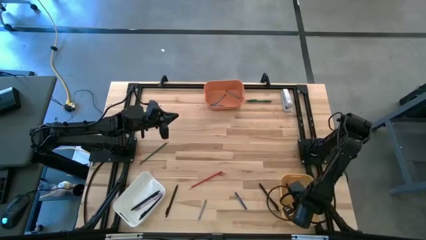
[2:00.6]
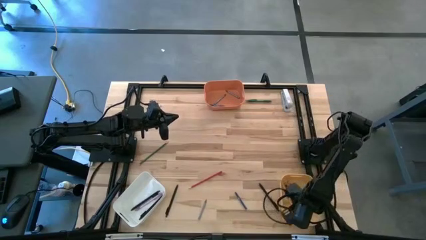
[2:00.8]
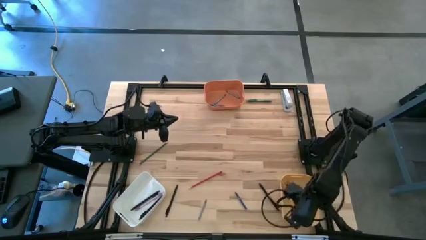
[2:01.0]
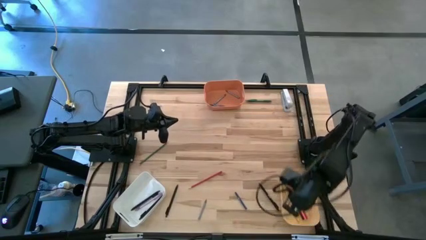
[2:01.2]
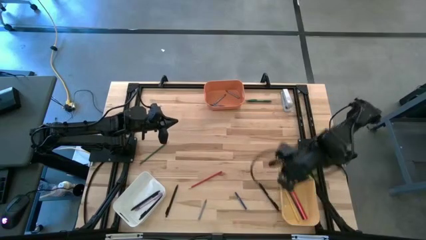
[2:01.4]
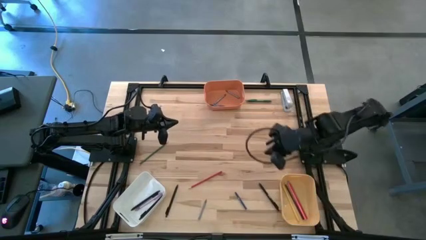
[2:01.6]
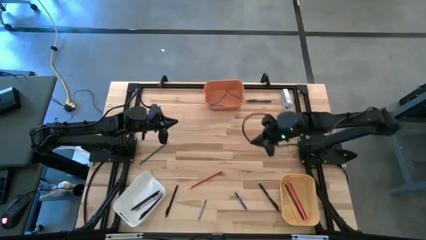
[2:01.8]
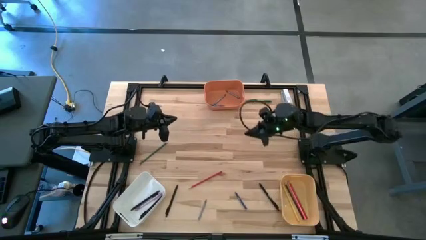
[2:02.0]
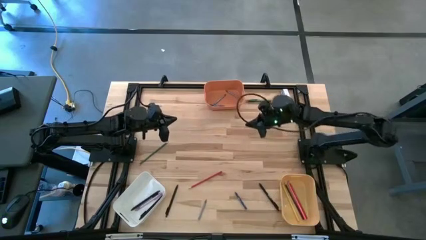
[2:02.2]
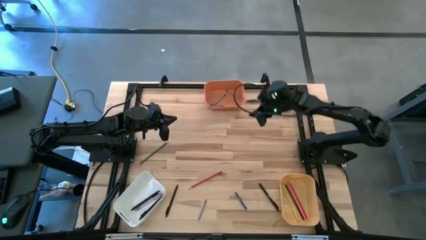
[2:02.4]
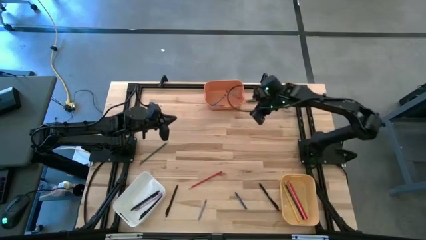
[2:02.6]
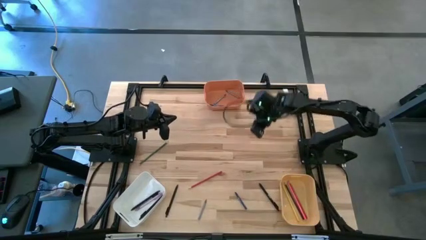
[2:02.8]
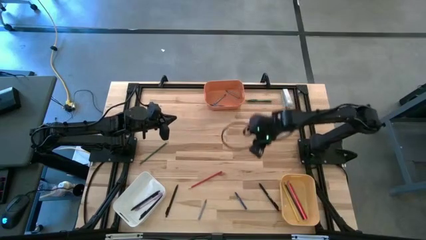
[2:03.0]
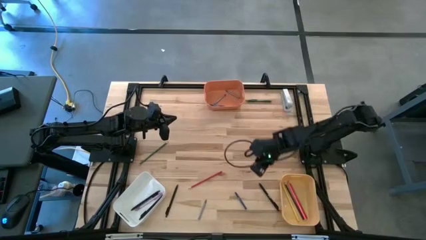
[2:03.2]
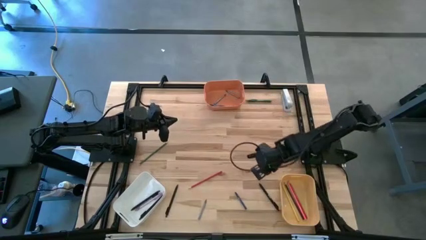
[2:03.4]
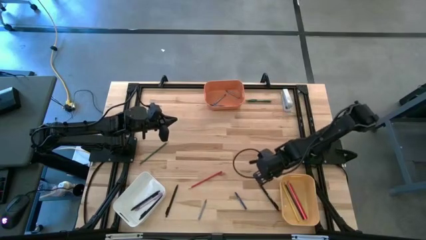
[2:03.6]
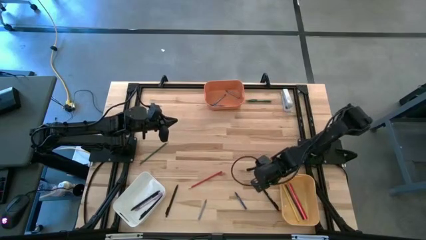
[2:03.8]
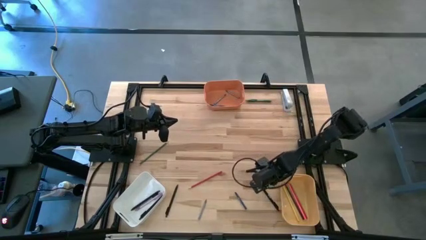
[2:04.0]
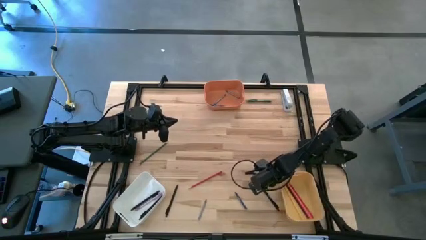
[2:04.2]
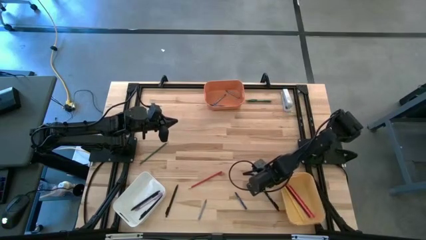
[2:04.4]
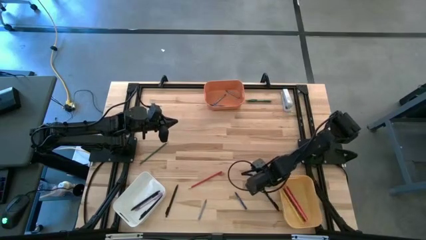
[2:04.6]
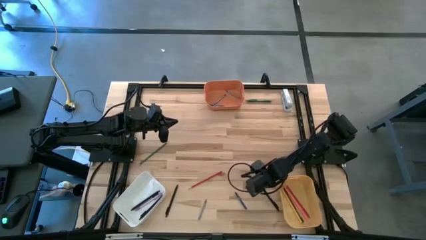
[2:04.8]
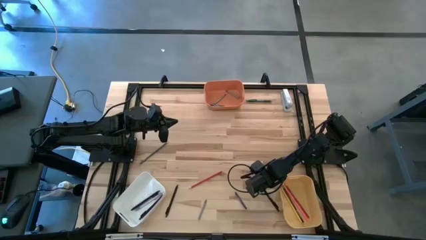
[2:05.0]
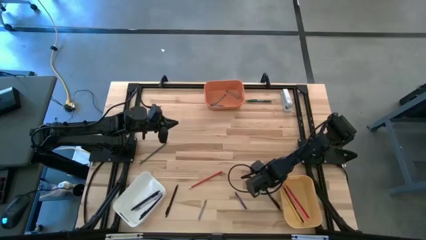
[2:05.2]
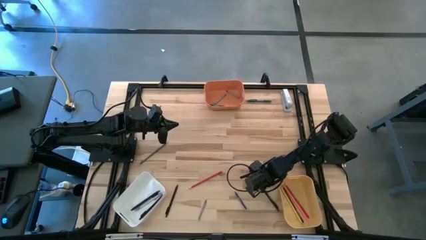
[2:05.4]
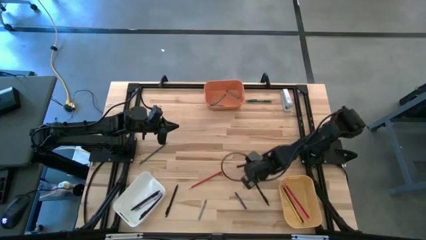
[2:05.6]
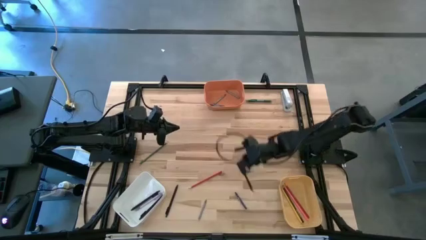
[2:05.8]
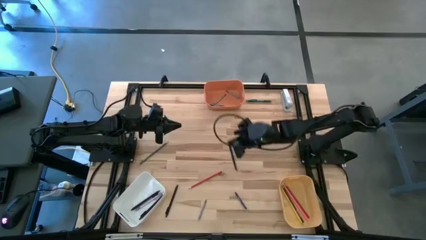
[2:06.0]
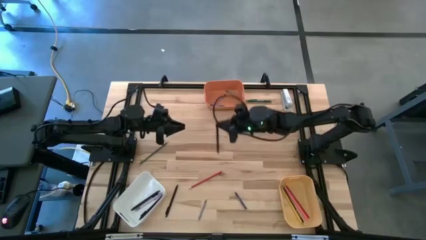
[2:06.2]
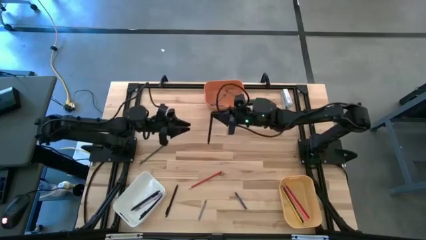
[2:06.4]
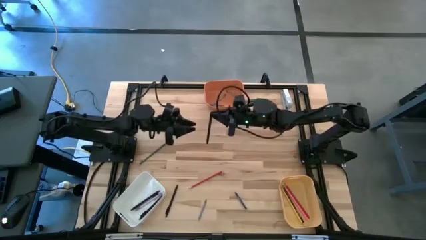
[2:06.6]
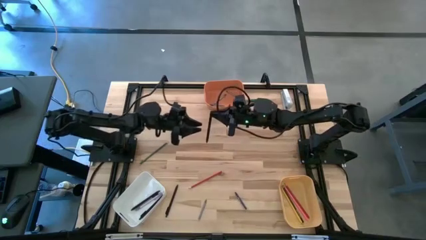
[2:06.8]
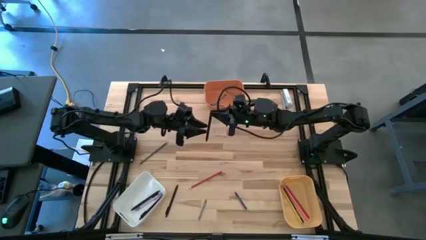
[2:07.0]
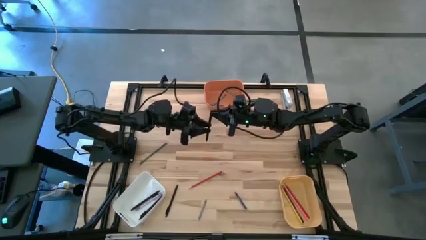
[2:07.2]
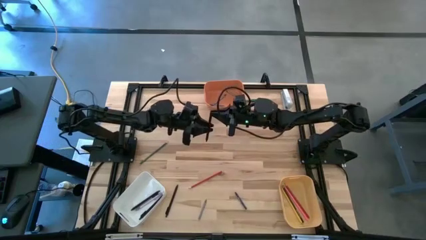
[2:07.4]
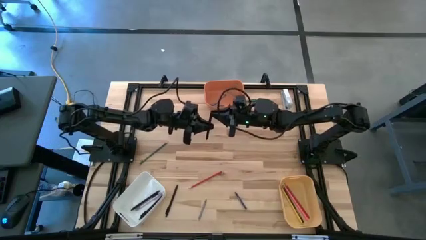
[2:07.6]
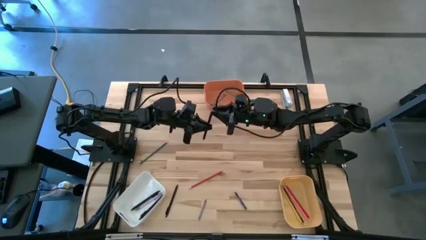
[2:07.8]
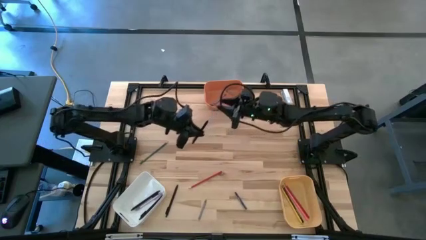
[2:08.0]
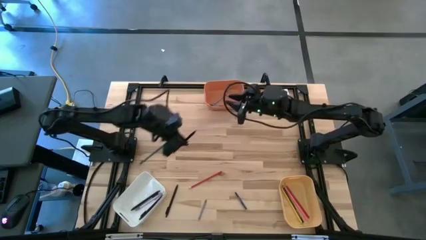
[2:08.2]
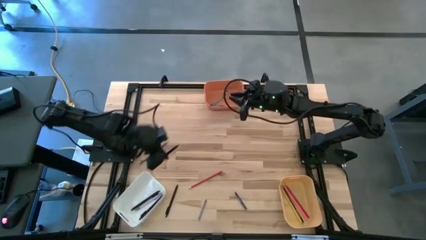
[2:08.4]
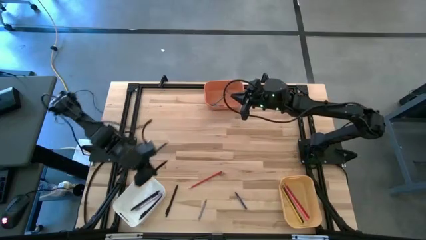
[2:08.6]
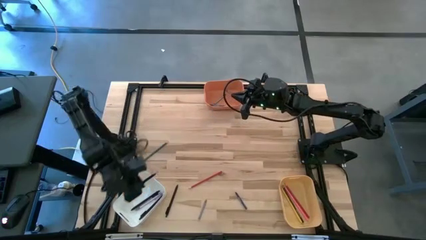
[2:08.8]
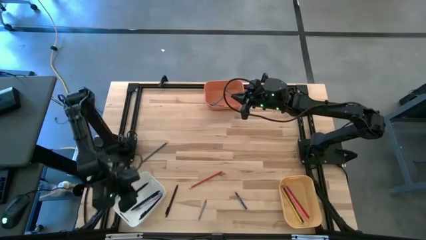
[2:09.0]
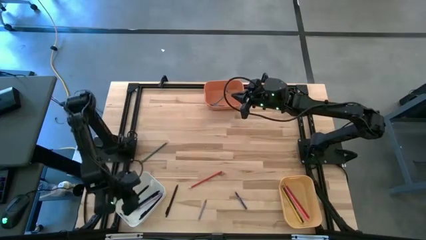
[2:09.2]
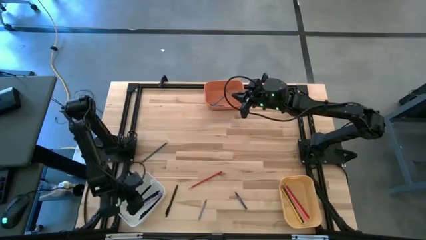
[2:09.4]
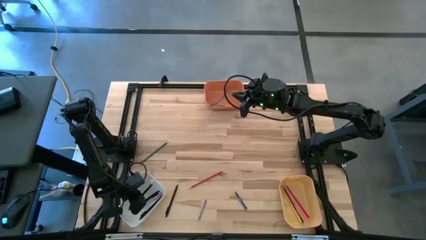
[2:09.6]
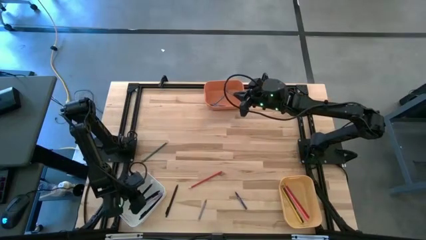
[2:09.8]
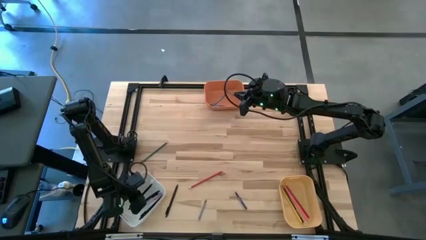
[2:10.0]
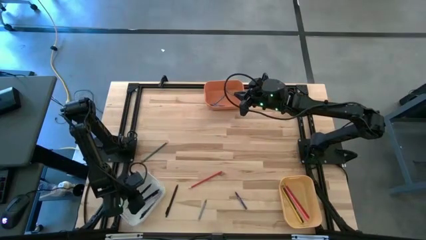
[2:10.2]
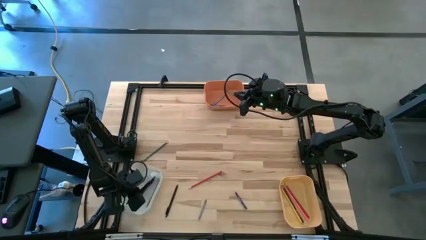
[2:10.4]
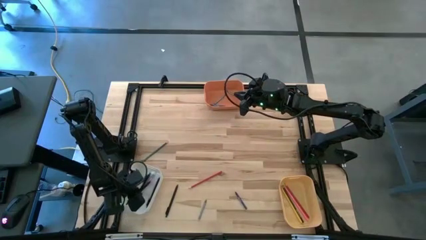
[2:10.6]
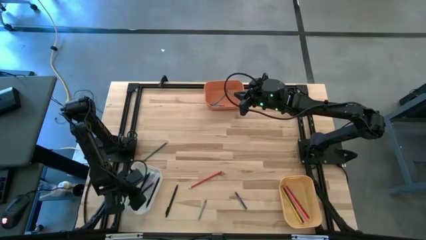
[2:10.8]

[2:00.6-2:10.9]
Task: Sort crayons/erasers/pens/pencils in bins
Put the black pen into the white bin

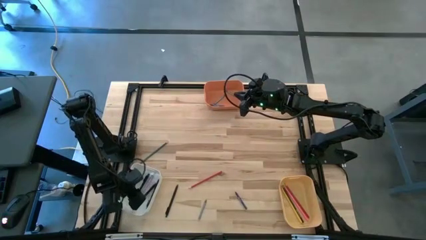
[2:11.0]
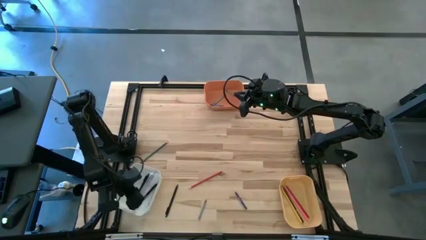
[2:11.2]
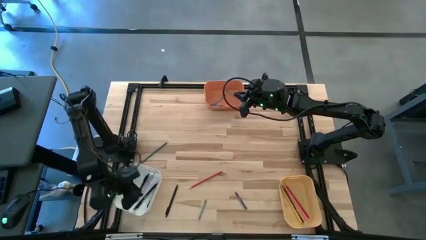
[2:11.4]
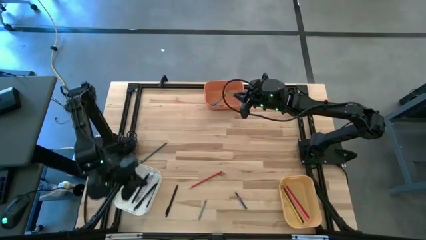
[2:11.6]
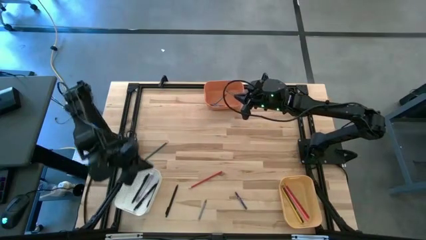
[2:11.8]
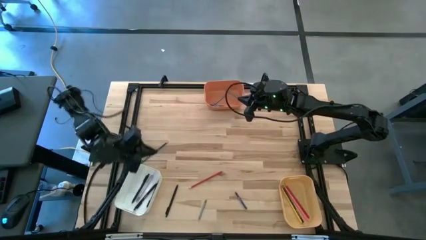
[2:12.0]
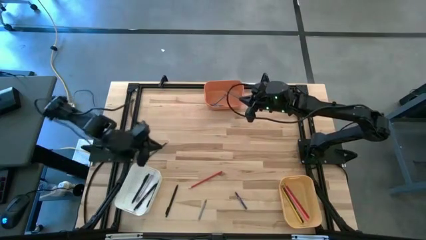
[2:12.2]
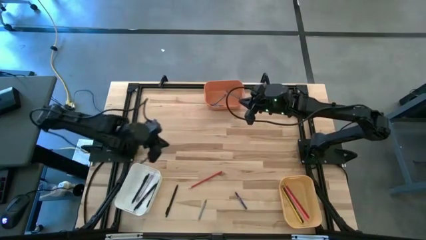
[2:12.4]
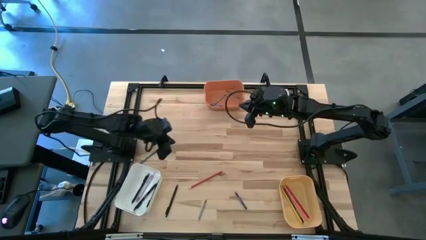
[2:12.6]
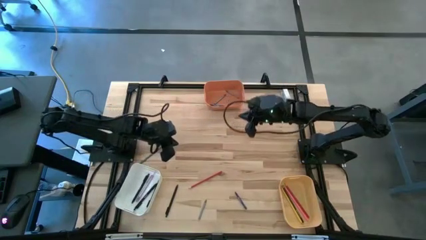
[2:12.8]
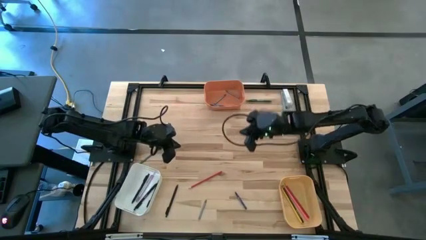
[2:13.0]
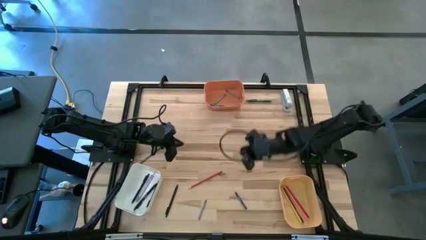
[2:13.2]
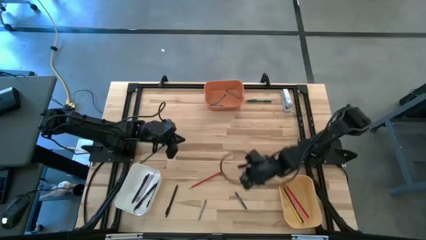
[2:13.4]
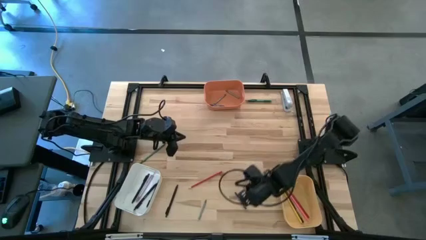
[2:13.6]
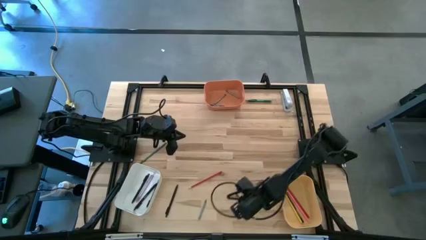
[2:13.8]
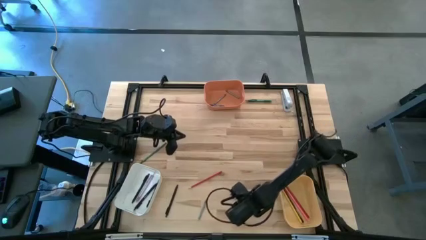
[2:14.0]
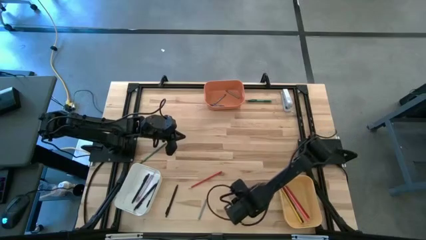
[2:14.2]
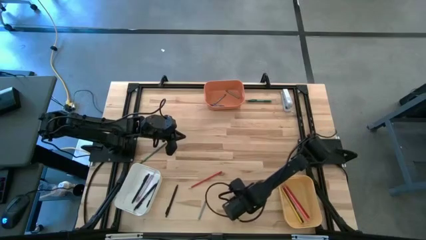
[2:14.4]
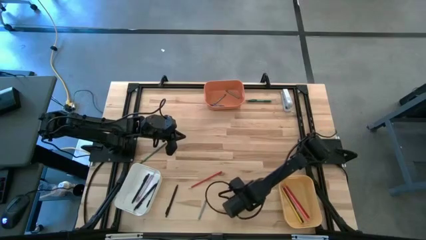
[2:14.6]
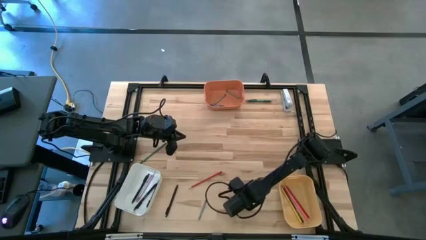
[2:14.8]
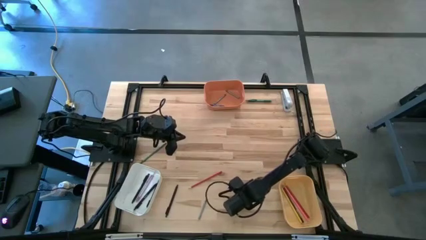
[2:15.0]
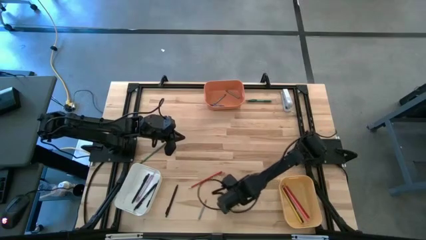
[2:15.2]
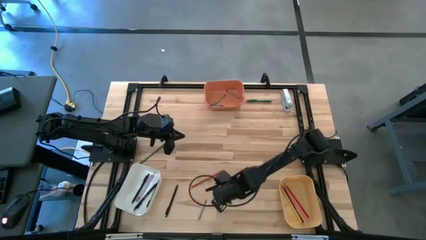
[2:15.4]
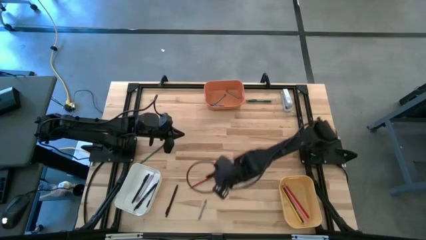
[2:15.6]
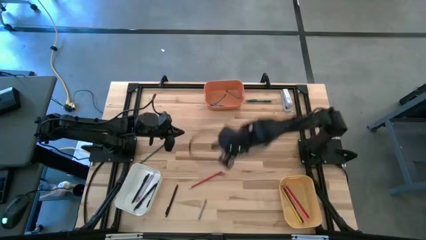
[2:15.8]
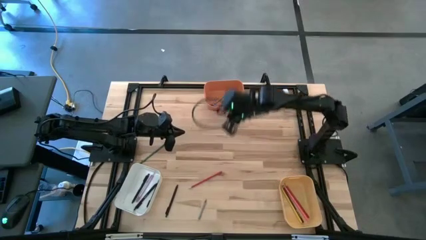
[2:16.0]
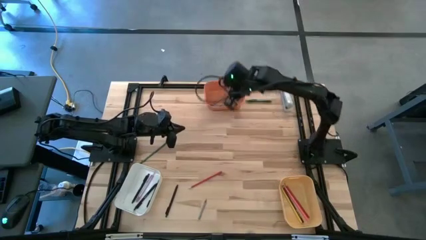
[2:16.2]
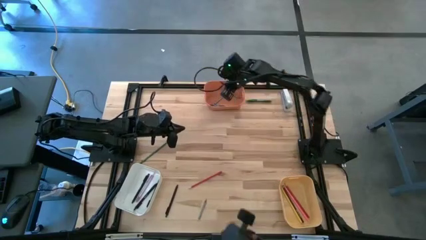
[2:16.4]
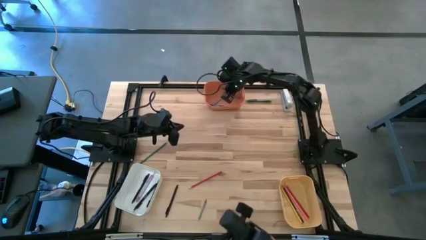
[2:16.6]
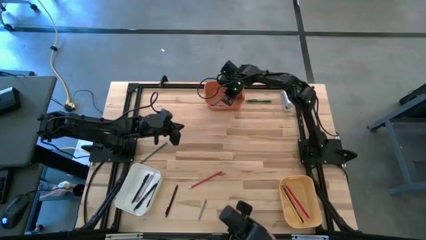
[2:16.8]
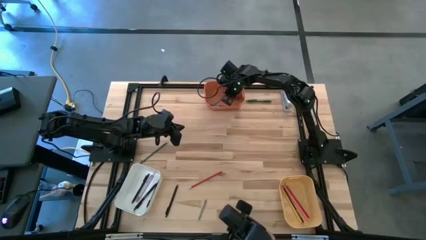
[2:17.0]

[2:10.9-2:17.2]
Put the blue crayon into the orange bin
